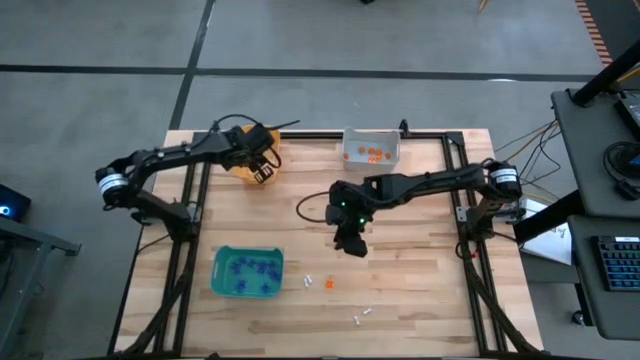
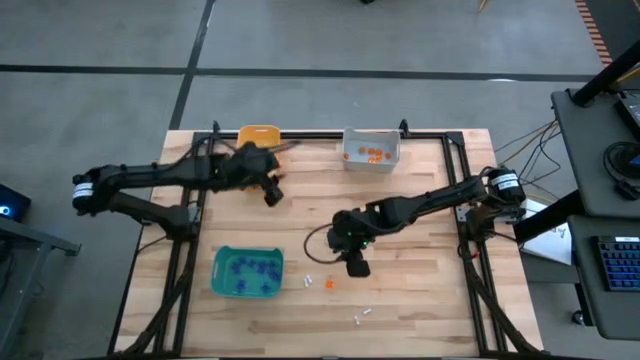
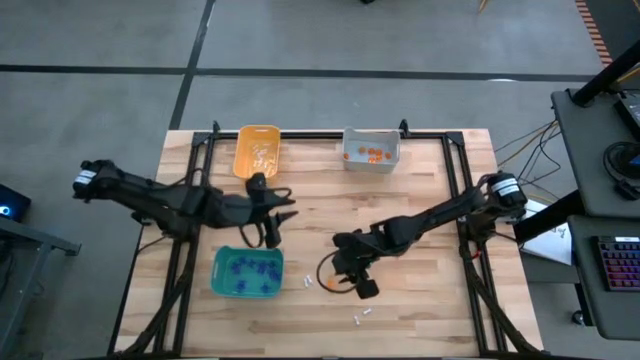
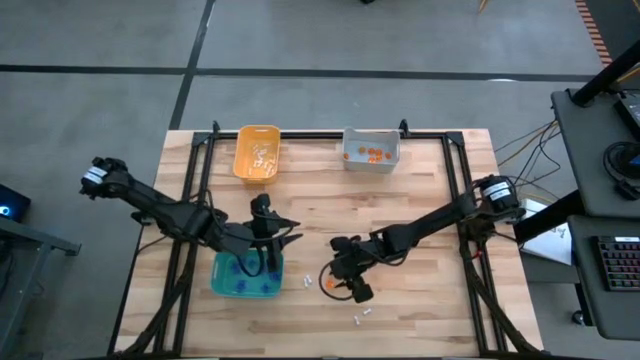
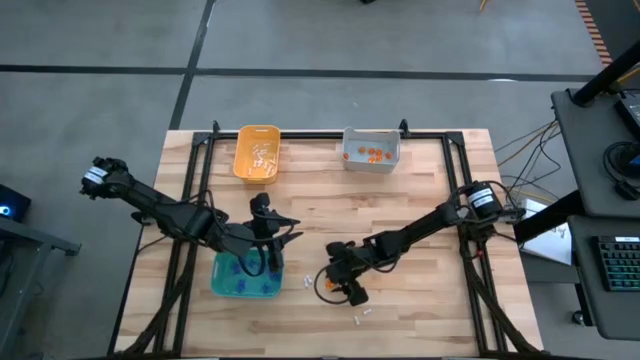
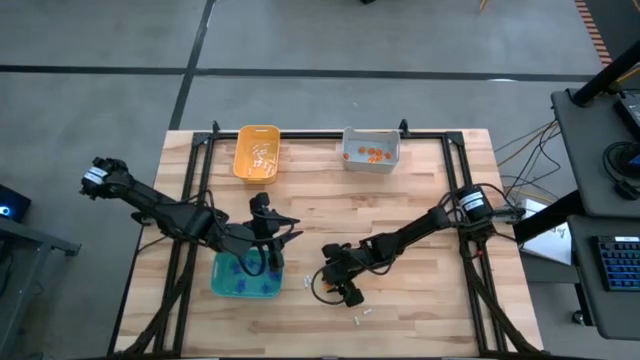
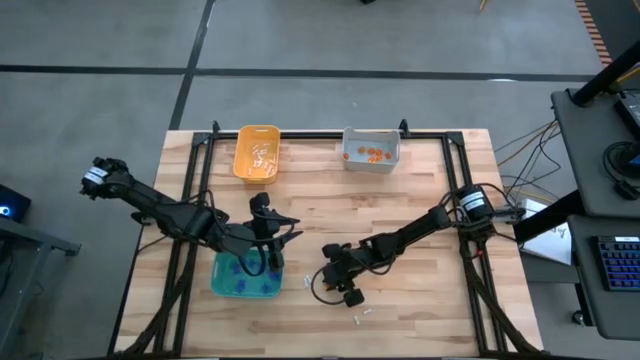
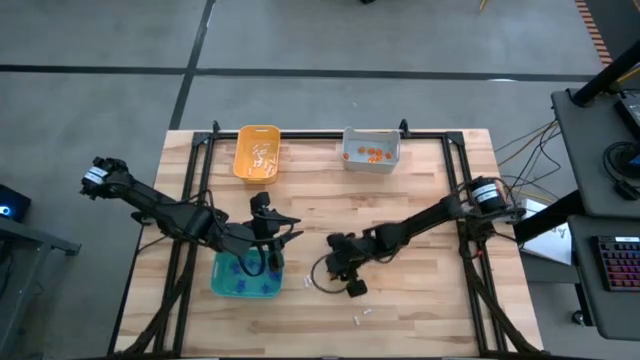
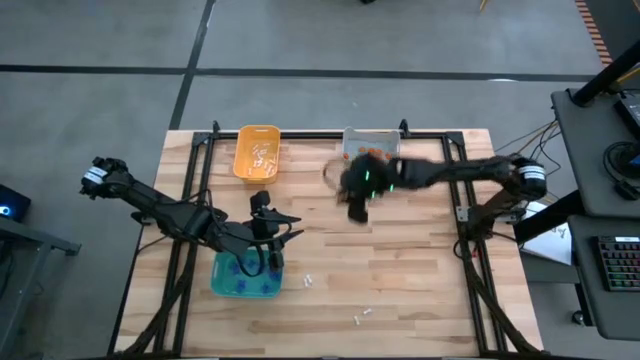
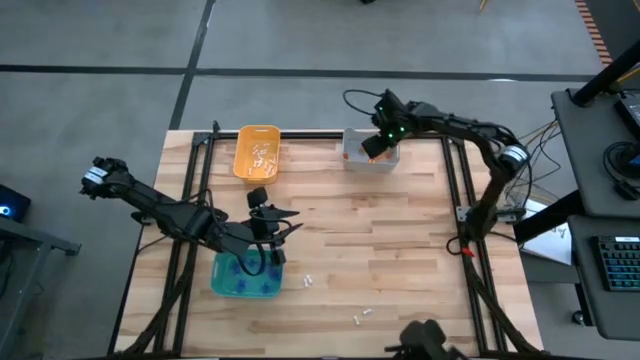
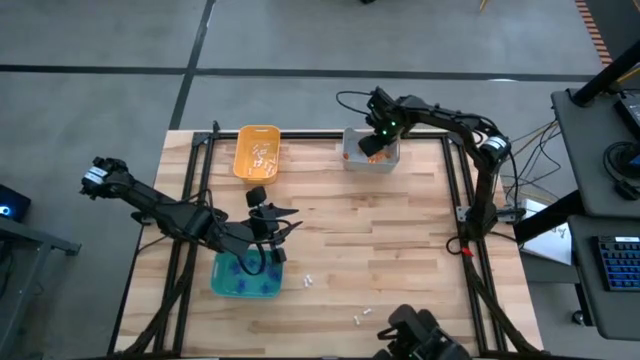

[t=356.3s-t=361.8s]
Task: Sort Halloween decoration
Put the orange pumpkin toy into the gray bin

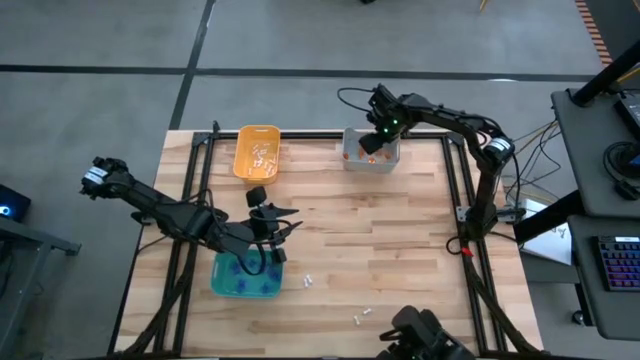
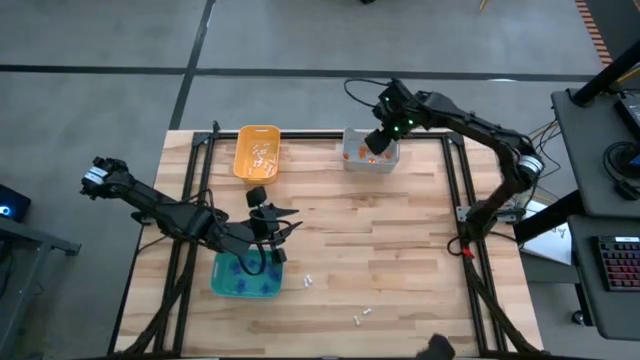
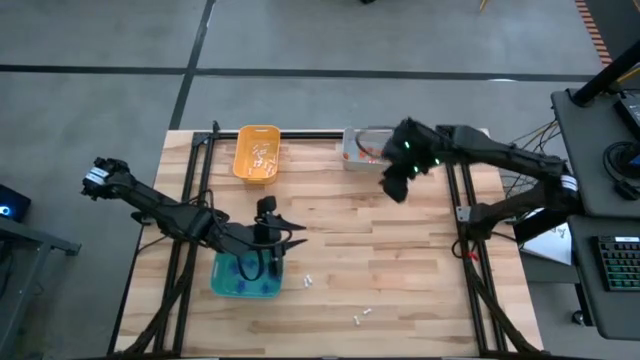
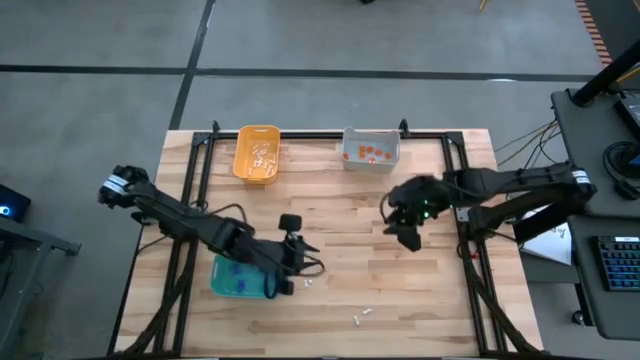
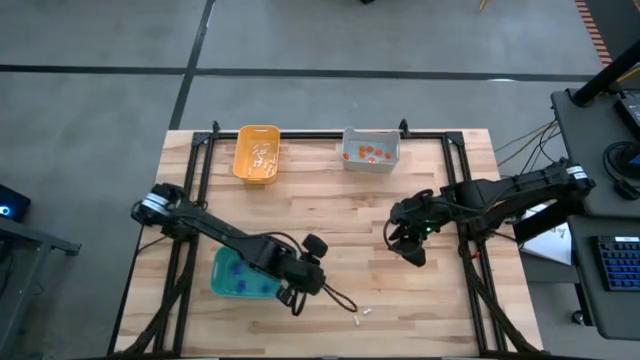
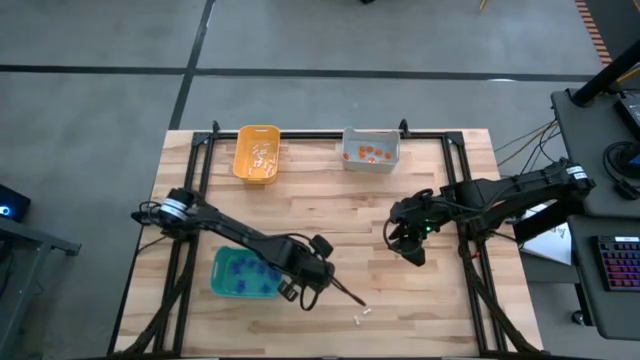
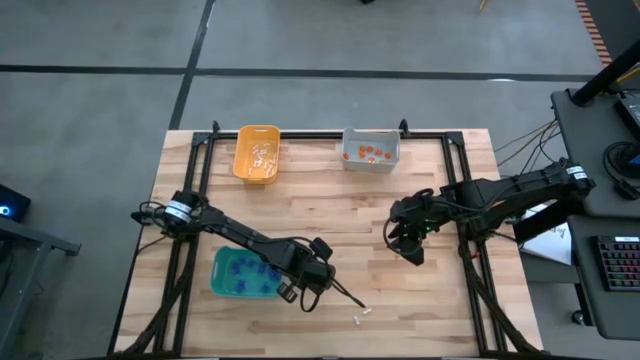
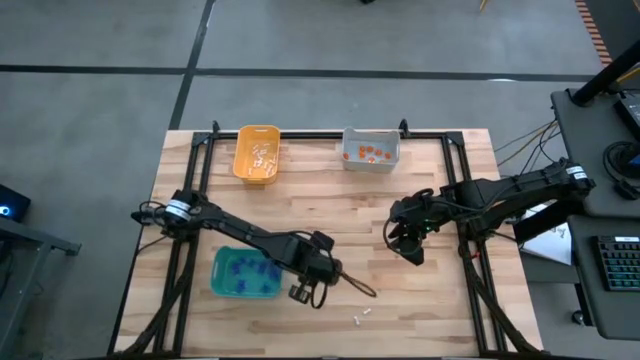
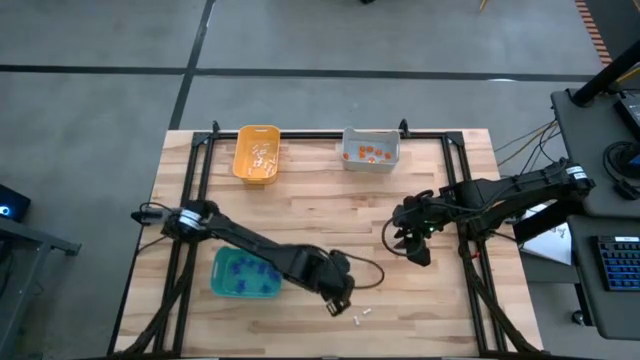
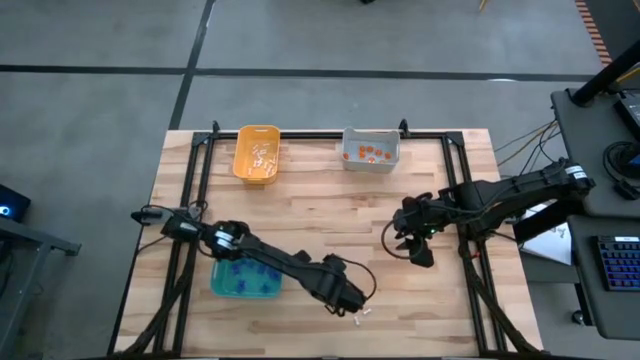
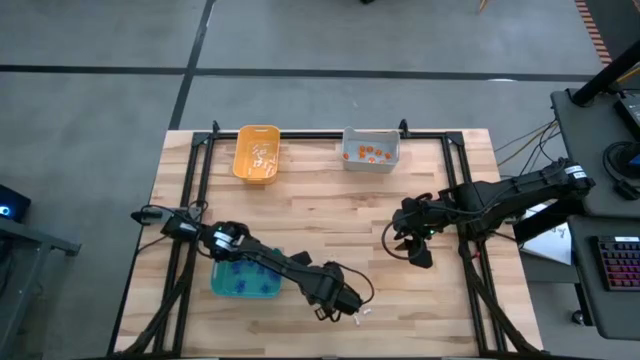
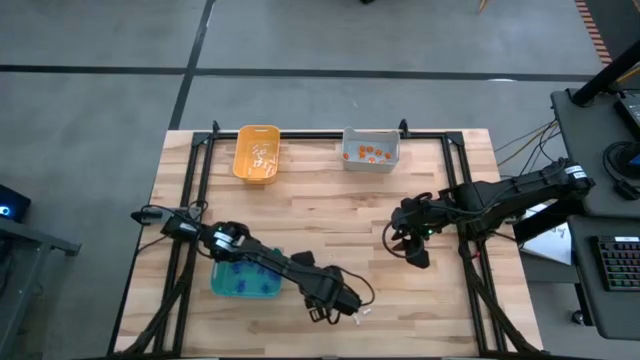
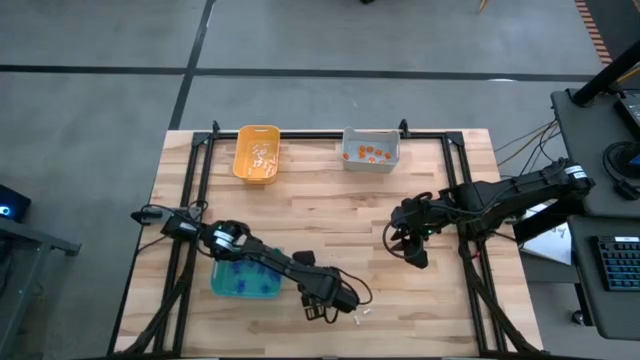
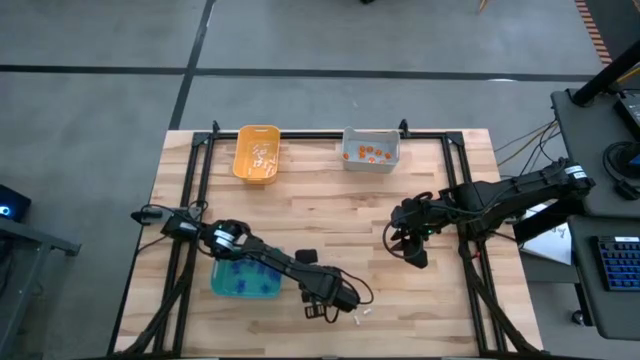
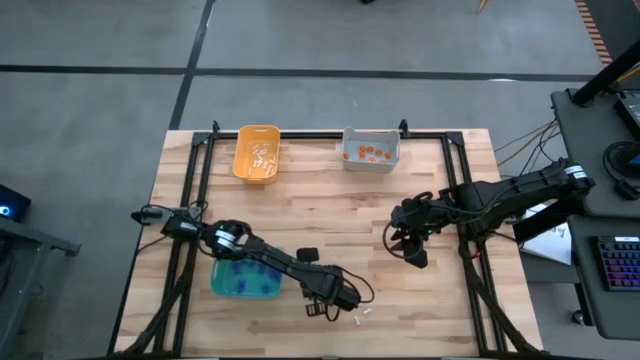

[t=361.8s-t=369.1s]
Put the white bone toy into the orange bin

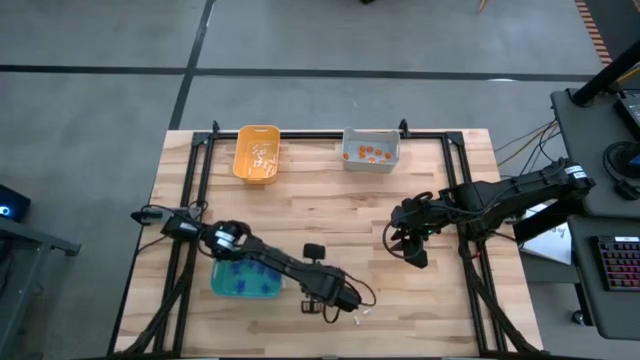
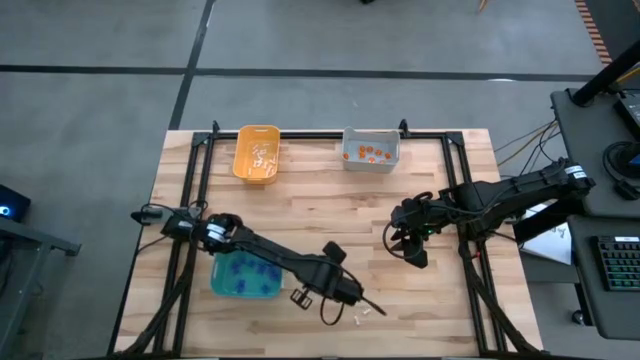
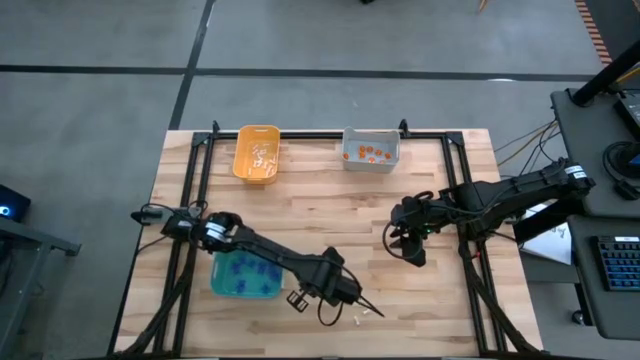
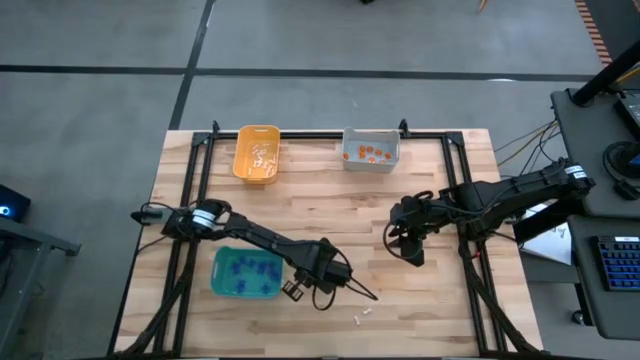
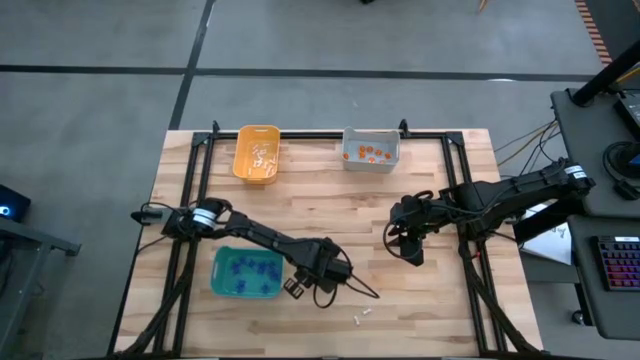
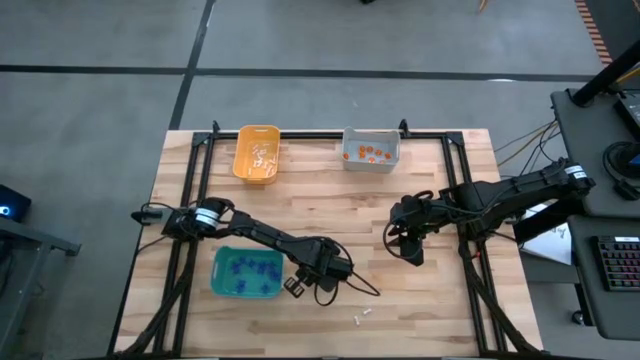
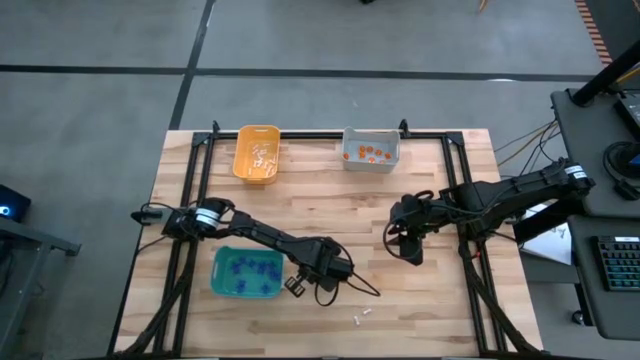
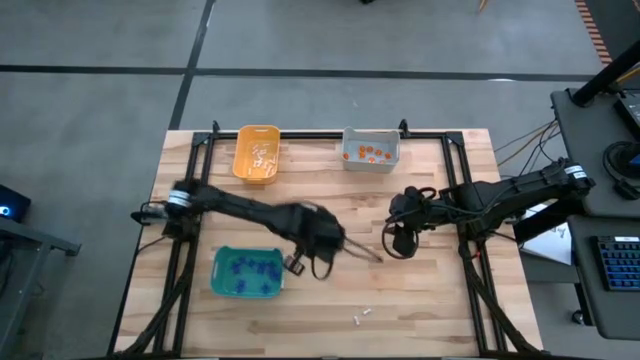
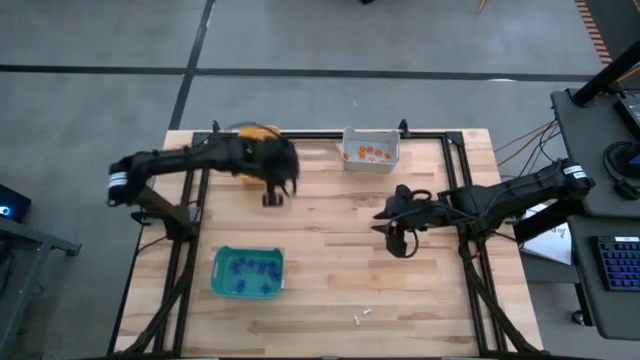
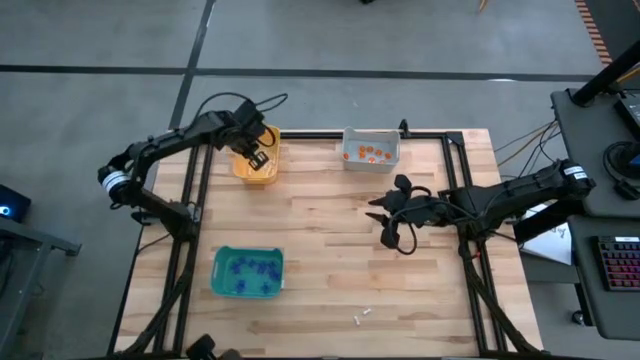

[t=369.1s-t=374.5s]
Put the white bone toy into the orange bin

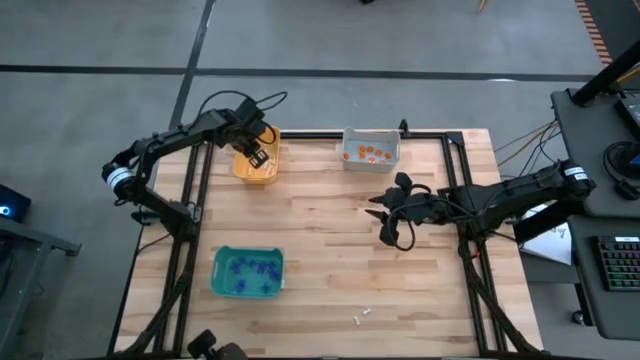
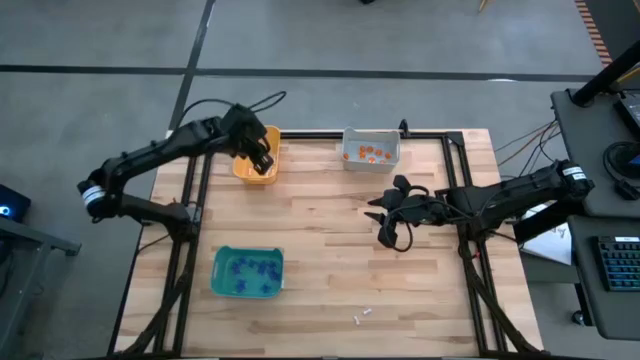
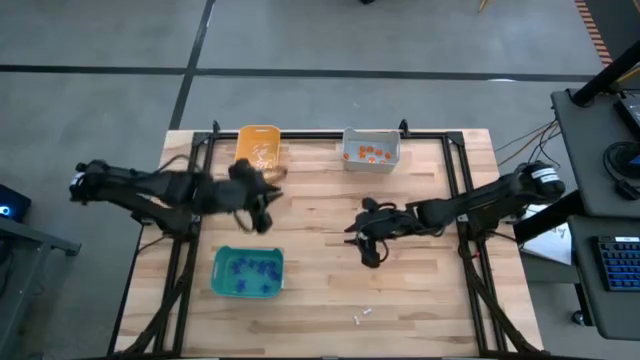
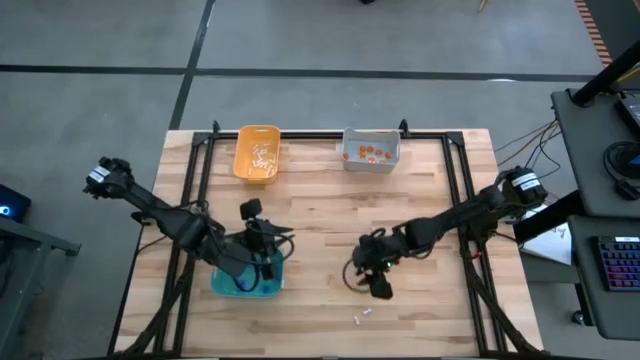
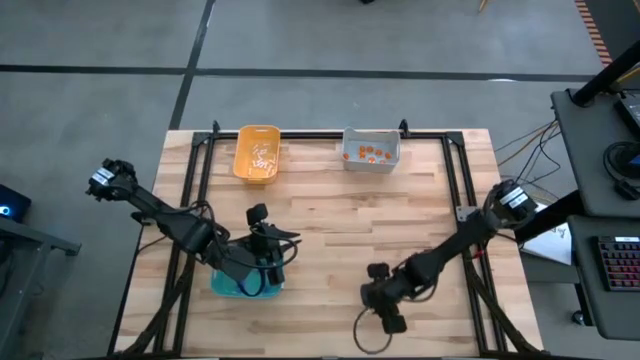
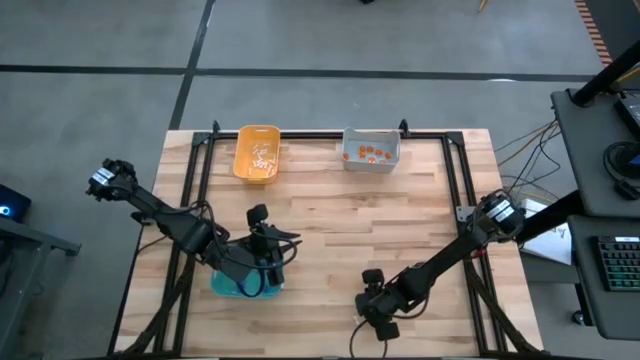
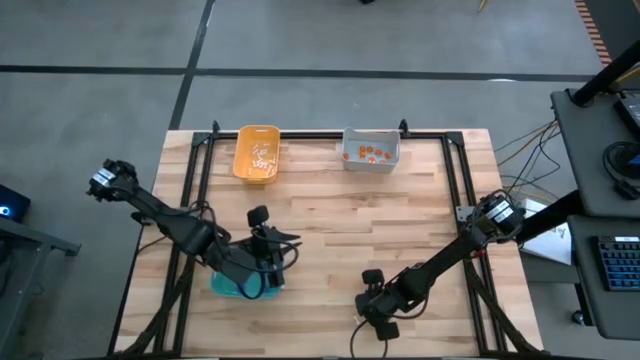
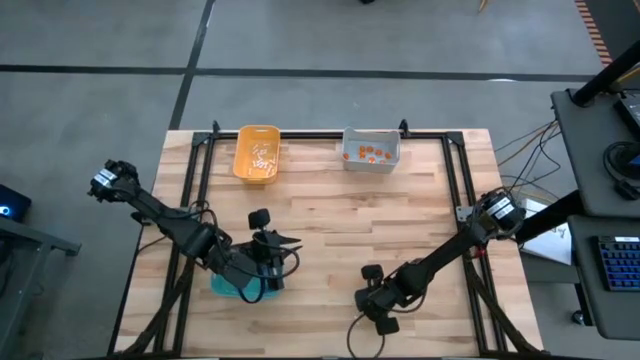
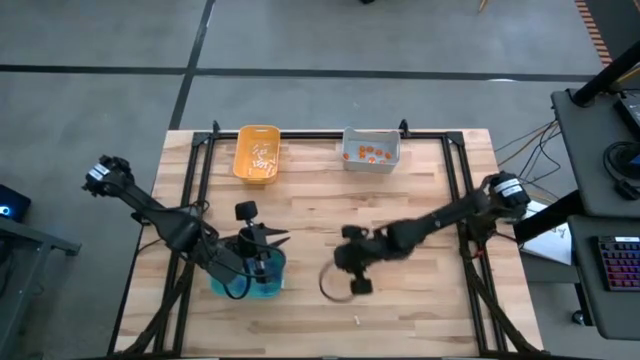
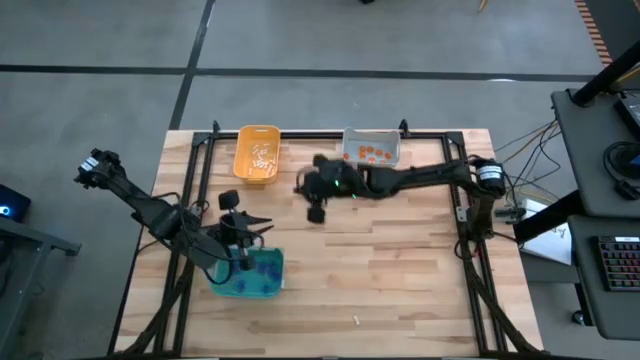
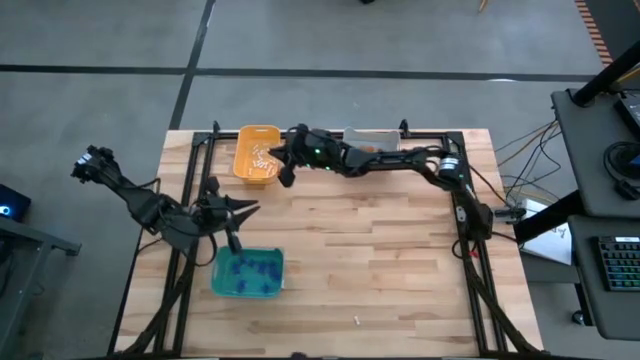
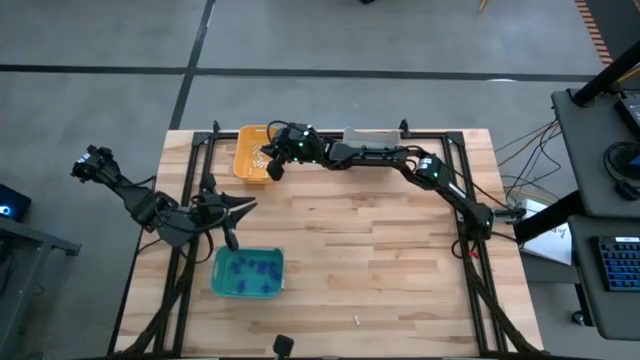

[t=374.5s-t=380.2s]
Put the white bone toy into the orange bin
